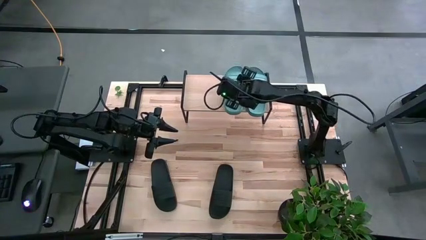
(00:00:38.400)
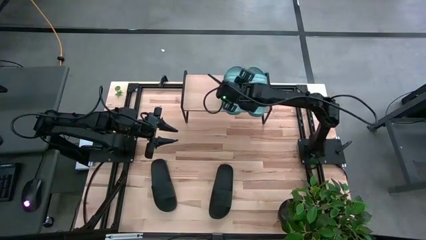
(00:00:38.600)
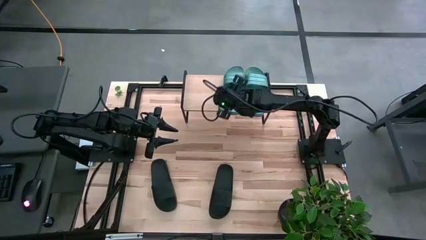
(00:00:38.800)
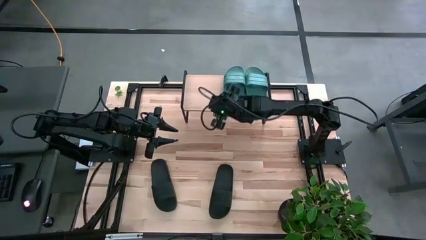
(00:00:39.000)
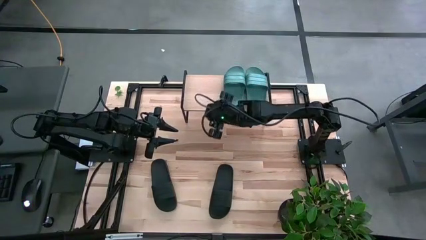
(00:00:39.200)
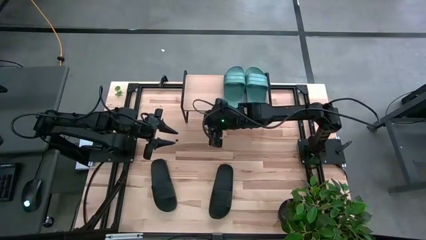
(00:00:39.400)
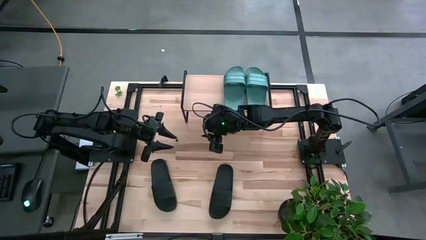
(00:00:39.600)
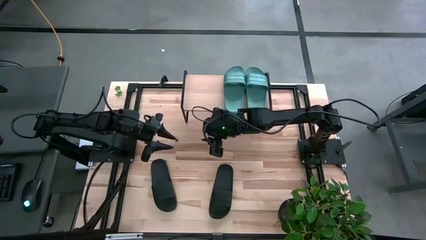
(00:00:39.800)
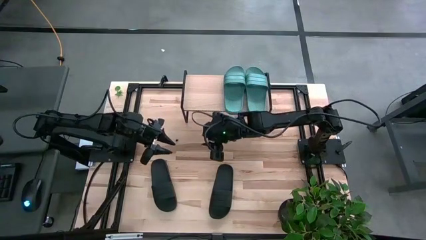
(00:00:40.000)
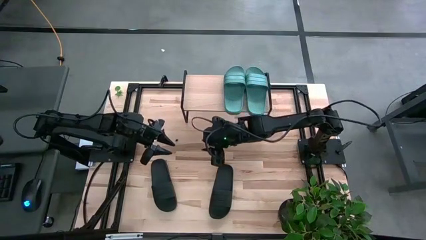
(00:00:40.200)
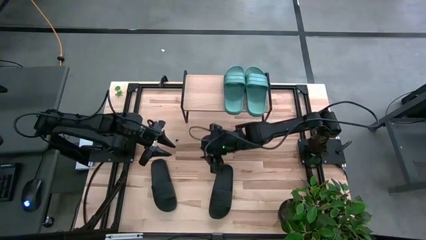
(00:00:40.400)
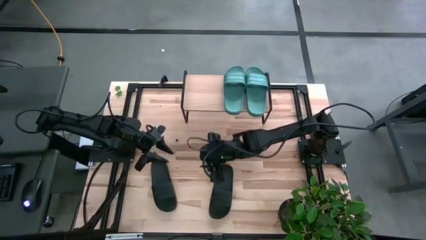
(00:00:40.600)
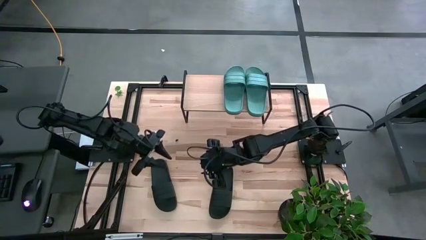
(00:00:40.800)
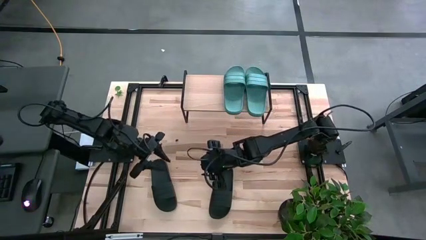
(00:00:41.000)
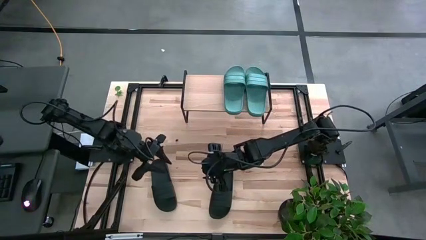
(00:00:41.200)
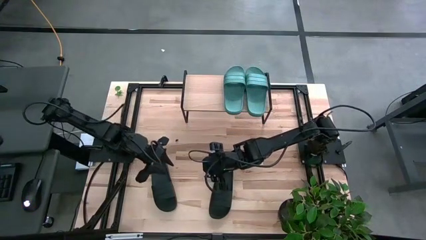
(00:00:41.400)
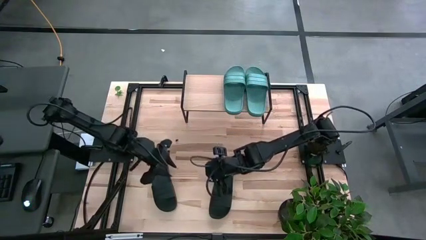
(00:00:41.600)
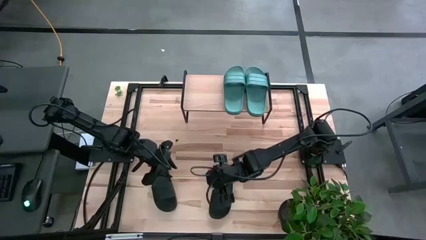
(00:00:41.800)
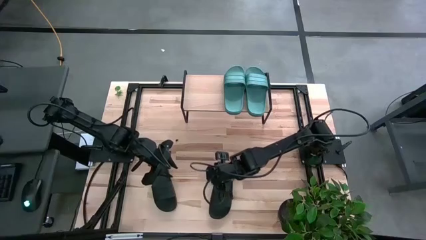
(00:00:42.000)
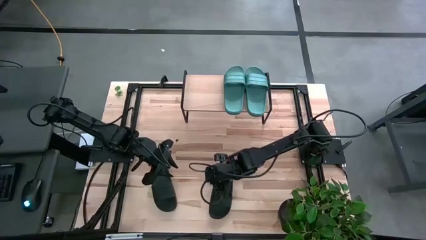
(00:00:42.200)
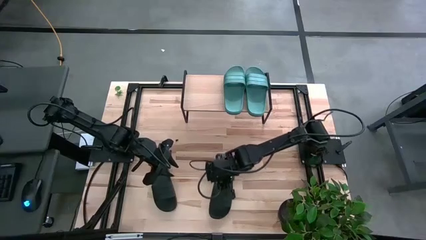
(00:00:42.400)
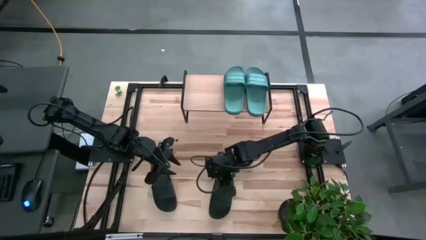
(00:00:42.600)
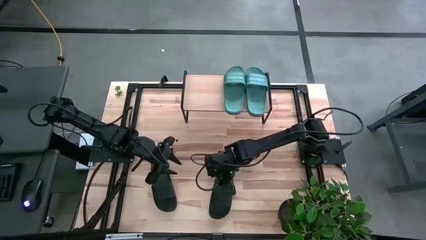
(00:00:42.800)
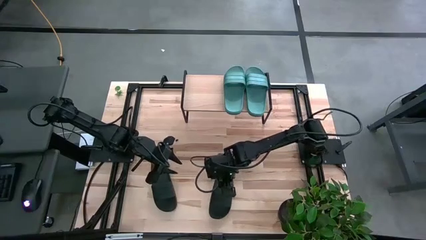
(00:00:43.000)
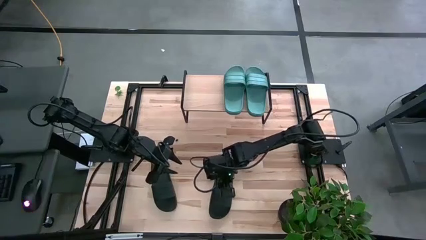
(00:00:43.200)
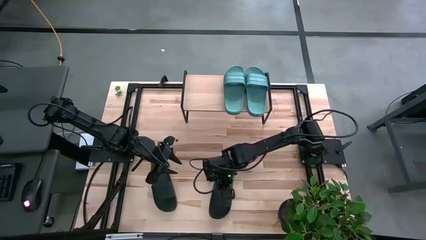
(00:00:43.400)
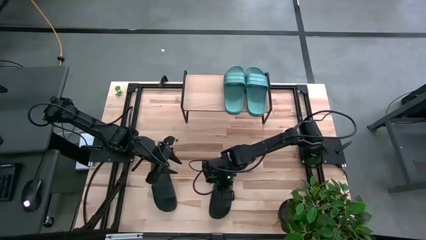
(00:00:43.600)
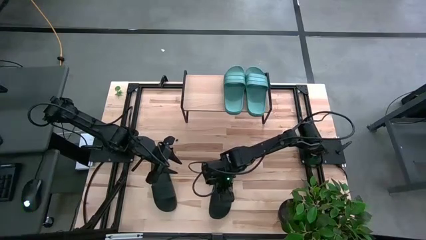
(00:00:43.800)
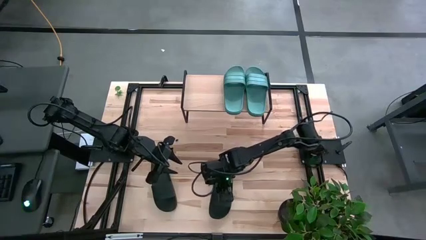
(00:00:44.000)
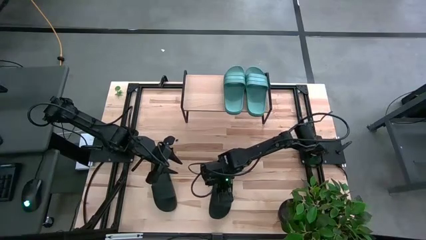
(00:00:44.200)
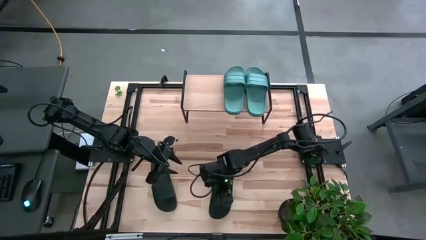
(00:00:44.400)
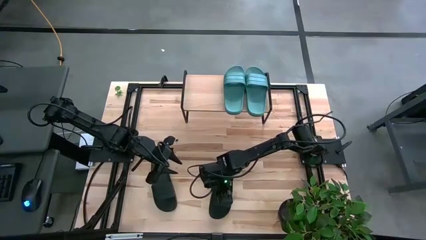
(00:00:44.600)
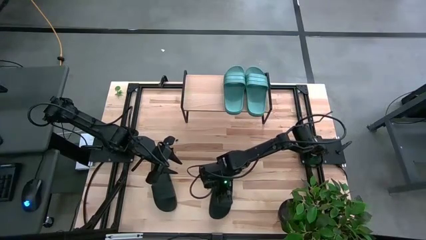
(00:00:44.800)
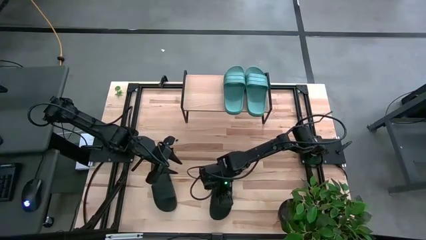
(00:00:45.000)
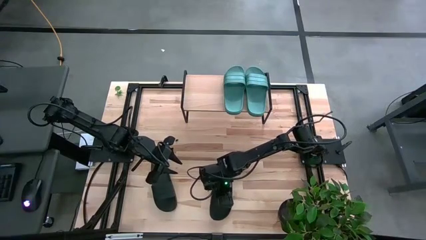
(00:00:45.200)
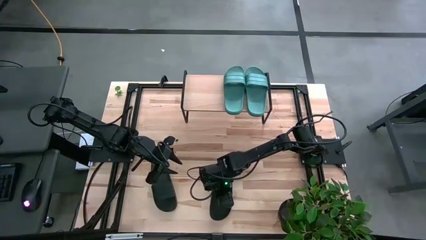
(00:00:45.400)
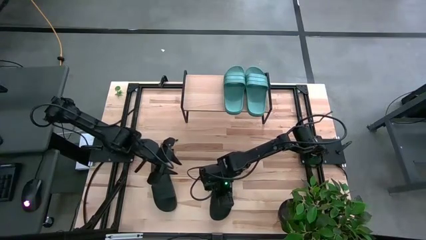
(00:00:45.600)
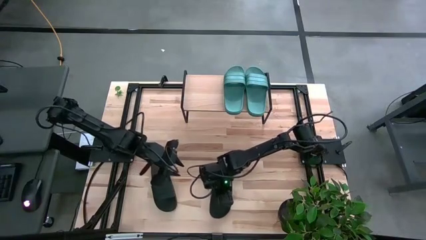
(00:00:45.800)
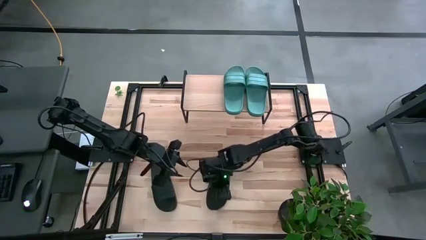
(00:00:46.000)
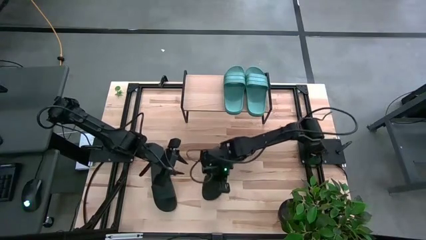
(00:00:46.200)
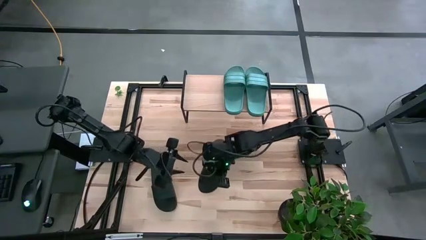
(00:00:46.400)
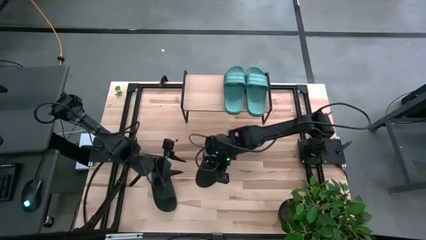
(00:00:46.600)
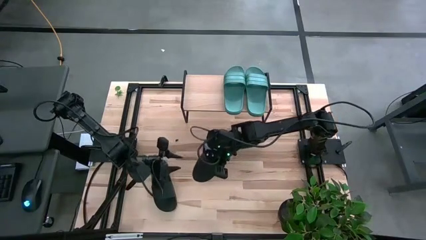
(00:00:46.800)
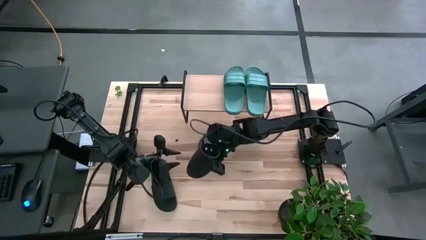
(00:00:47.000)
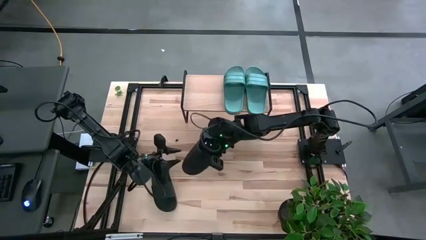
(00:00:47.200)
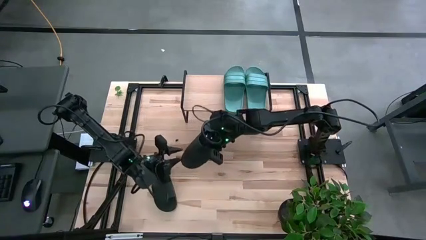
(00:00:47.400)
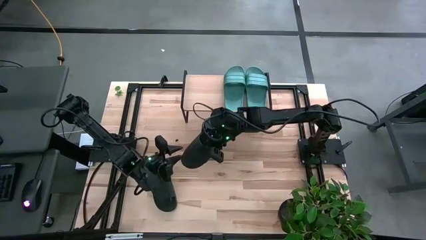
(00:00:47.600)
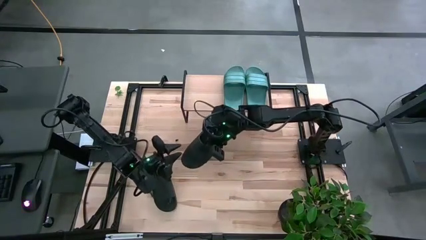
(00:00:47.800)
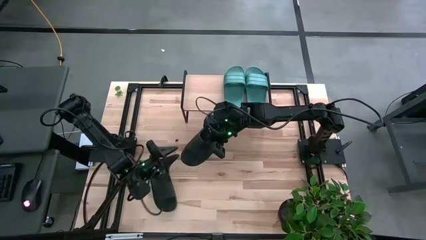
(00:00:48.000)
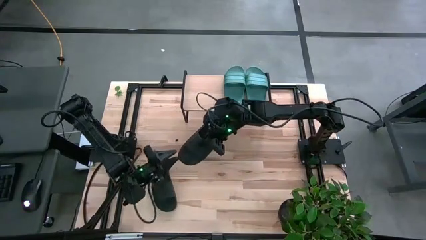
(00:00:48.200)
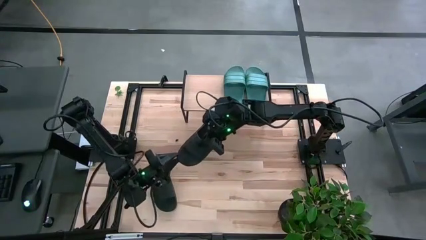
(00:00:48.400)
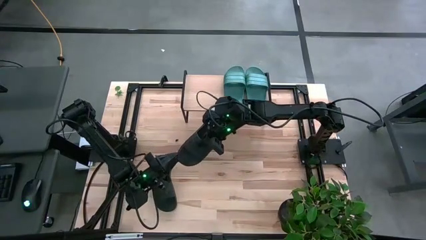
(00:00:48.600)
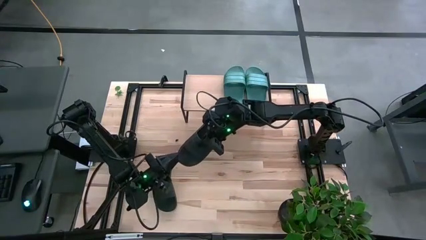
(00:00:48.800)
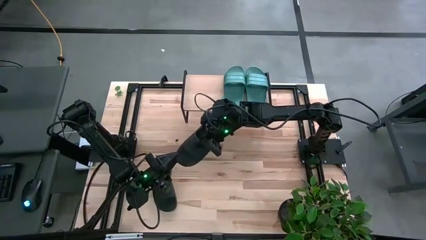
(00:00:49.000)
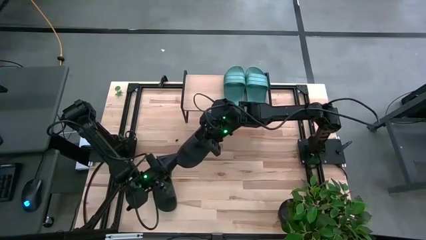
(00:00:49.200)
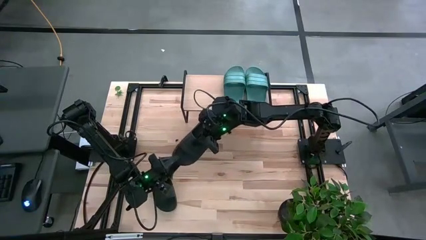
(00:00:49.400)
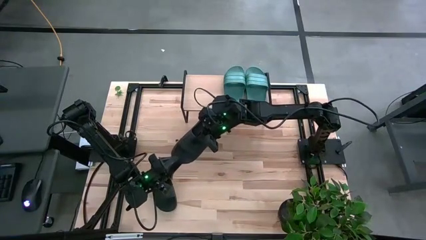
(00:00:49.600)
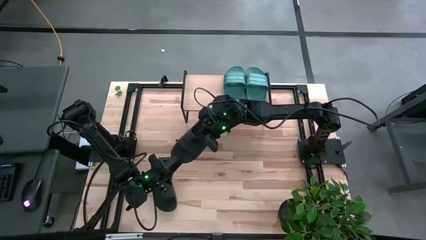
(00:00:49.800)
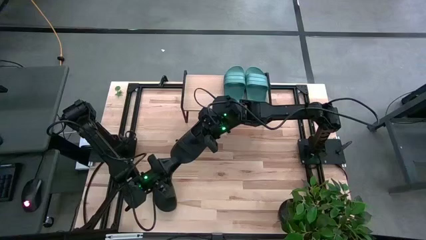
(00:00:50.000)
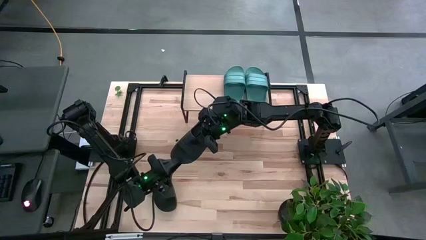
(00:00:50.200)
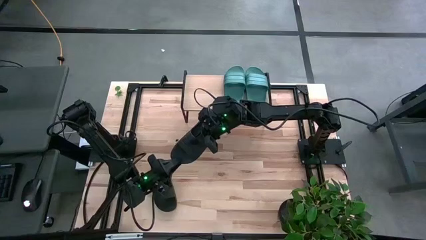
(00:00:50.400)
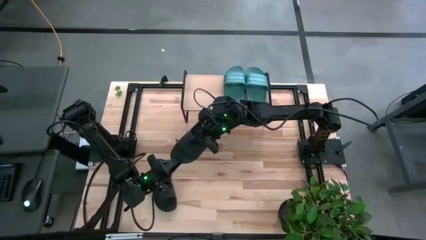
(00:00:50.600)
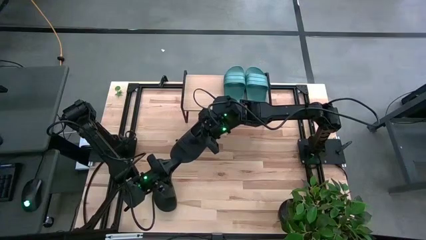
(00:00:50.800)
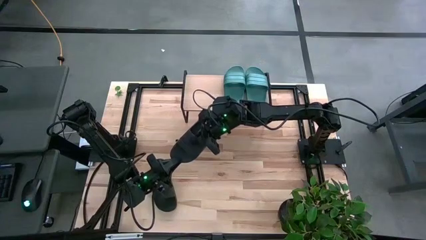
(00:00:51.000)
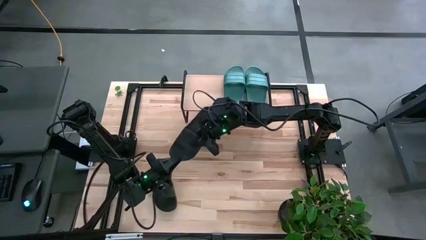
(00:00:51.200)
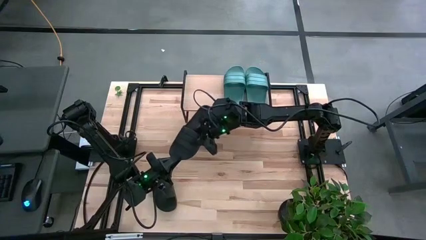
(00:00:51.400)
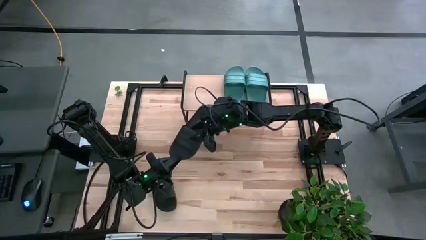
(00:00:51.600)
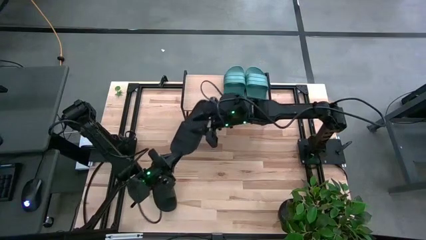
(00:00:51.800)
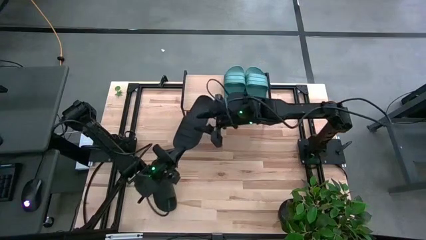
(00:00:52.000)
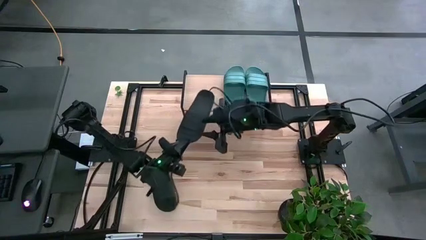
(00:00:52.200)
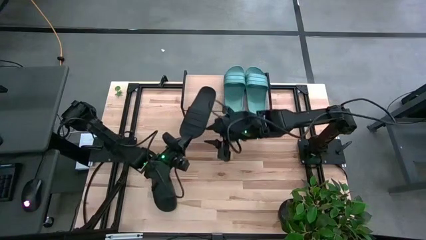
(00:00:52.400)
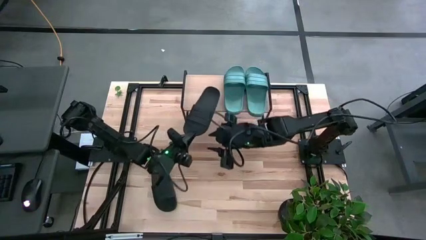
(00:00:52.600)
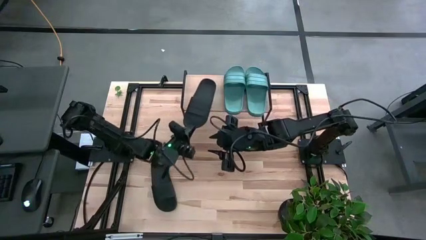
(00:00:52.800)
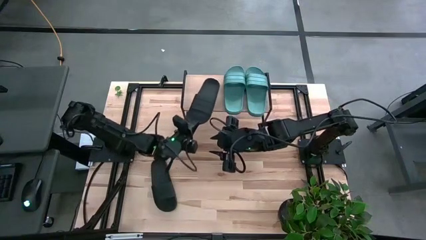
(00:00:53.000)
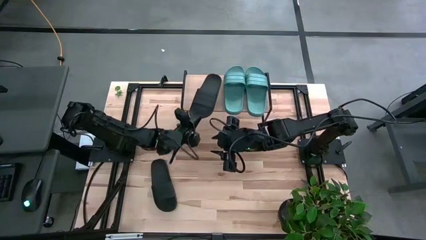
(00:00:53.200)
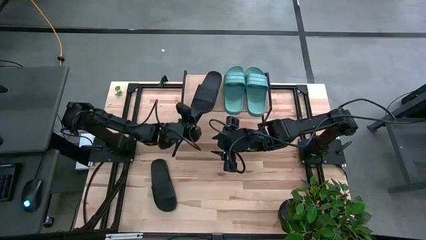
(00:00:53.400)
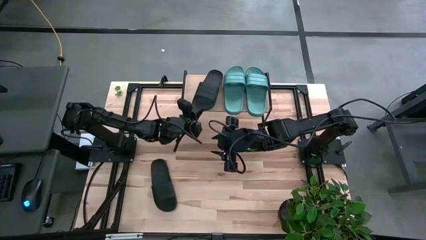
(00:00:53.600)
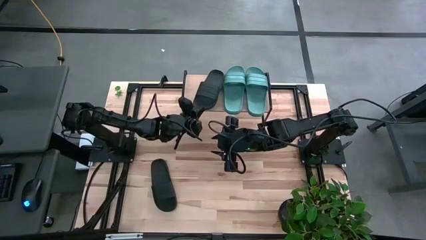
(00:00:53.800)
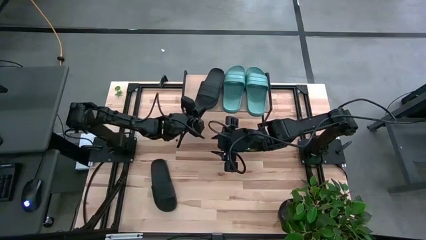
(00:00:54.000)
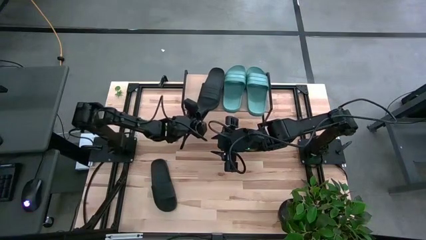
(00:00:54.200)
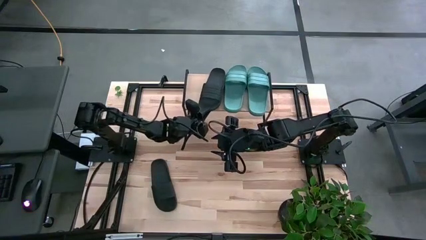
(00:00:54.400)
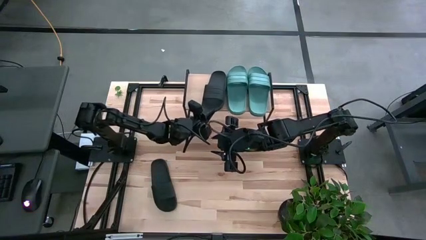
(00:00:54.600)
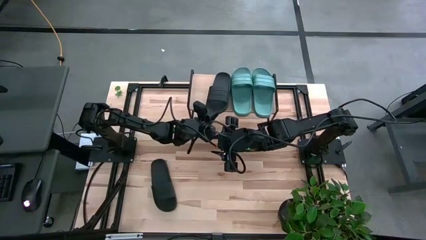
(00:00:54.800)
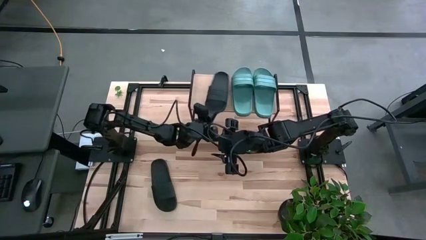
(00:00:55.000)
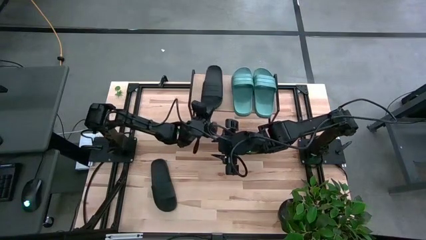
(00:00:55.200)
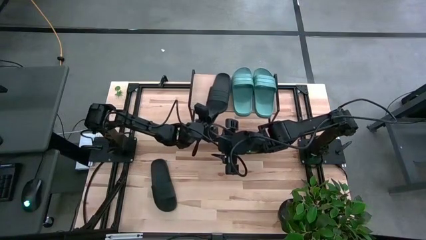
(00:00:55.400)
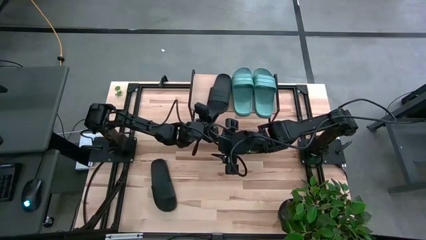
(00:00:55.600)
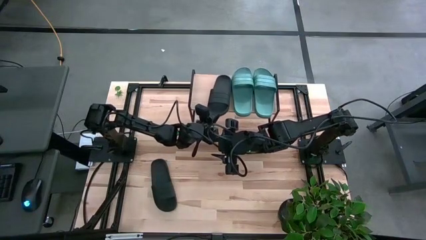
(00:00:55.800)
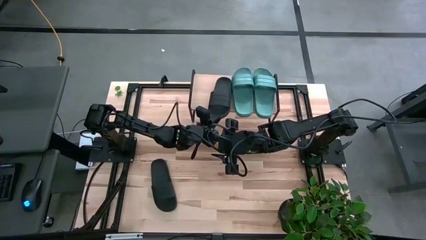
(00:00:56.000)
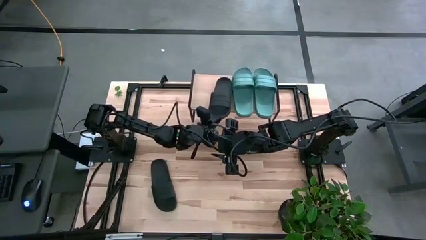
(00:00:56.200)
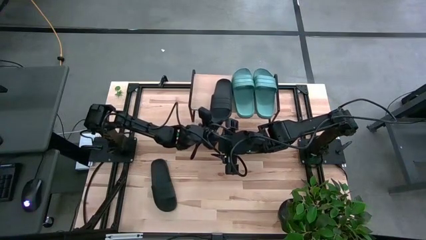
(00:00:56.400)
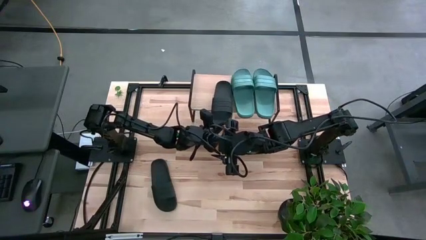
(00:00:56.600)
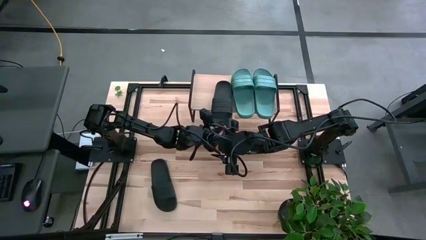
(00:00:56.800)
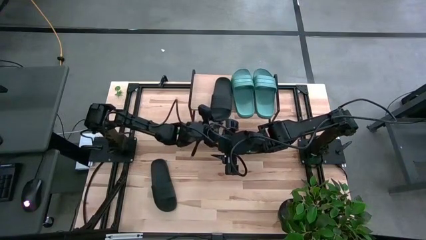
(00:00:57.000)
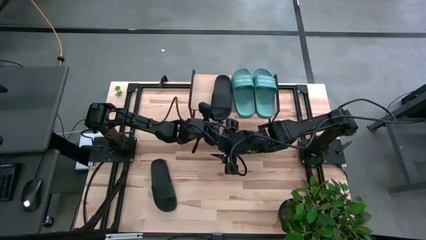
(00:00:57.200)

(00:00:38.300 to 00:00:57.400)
Task: Pick and place slides into the shelf
Put the right black slide on the shelf
